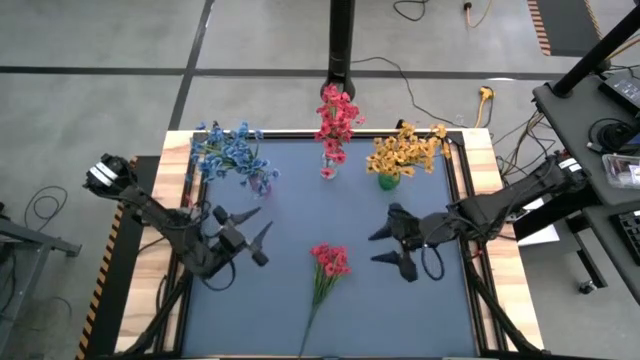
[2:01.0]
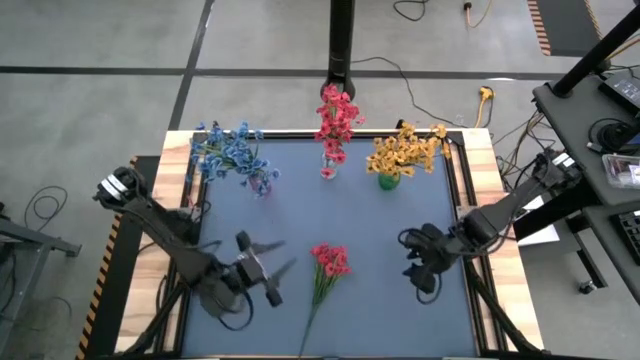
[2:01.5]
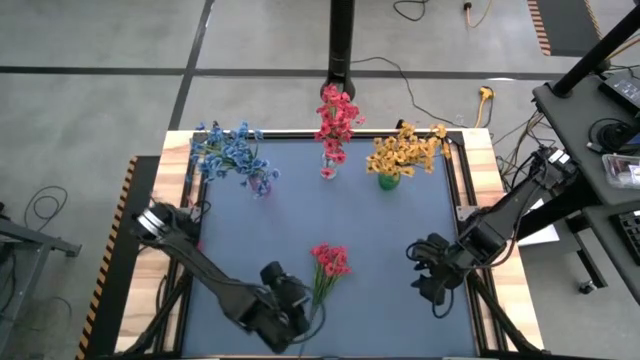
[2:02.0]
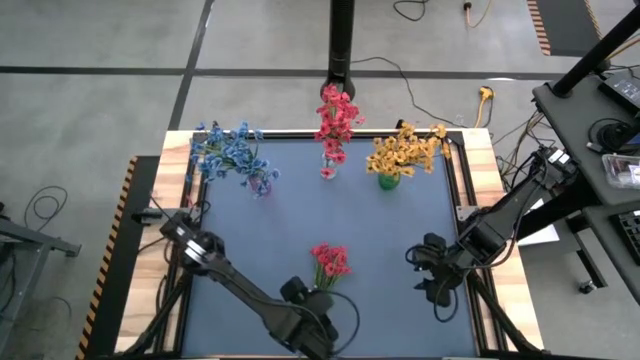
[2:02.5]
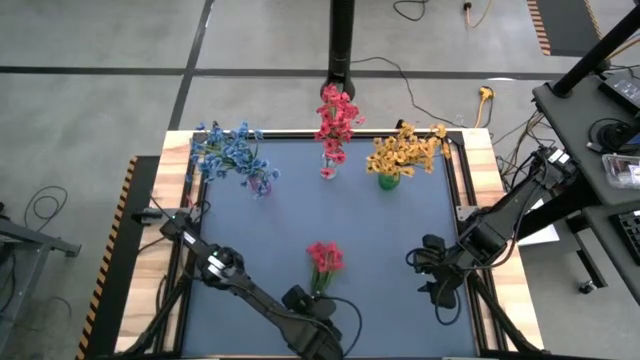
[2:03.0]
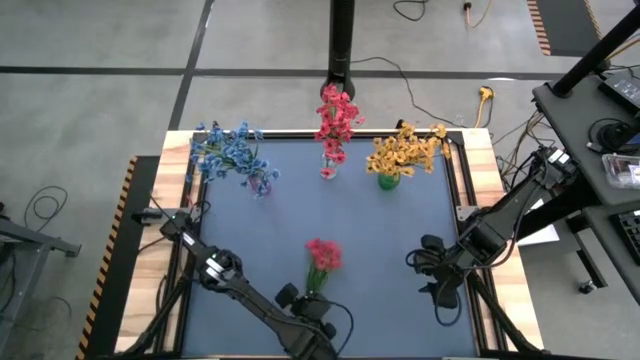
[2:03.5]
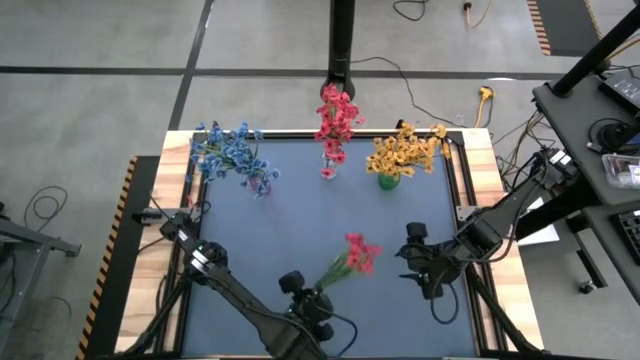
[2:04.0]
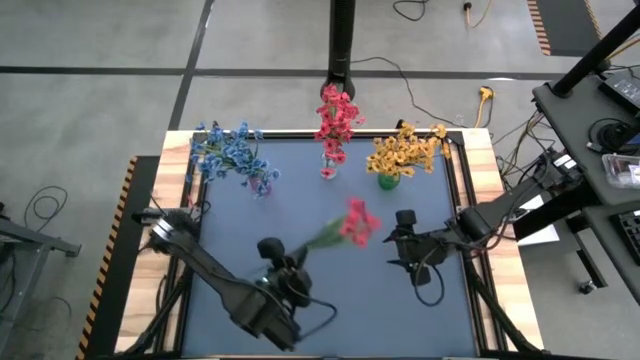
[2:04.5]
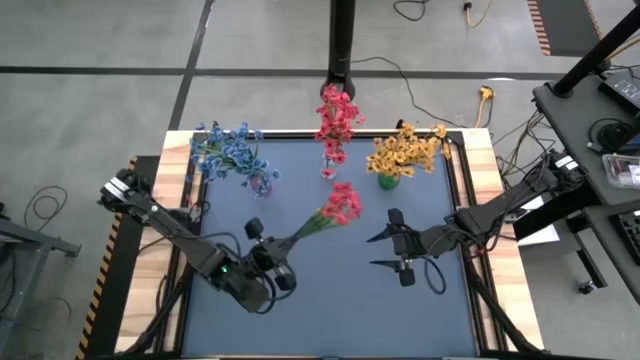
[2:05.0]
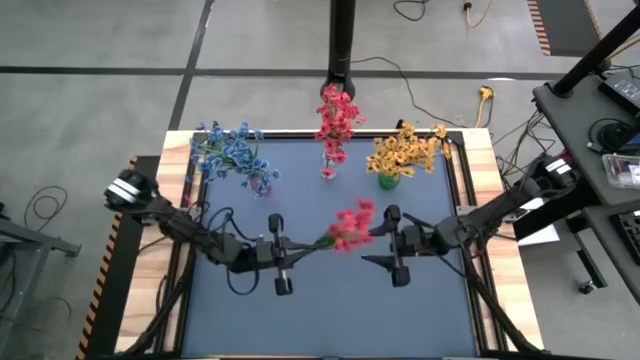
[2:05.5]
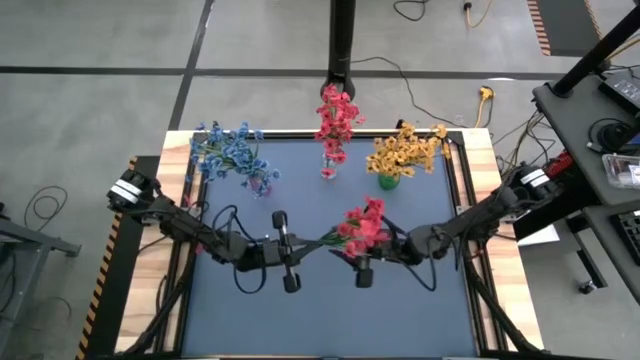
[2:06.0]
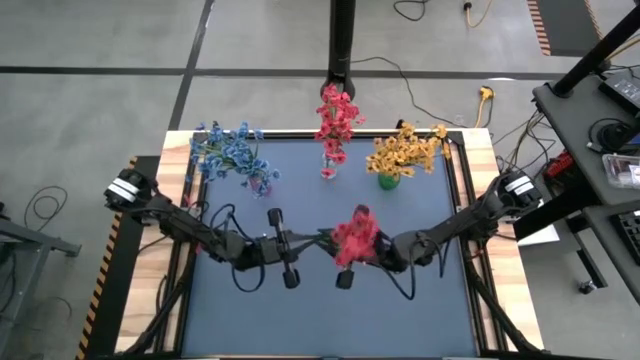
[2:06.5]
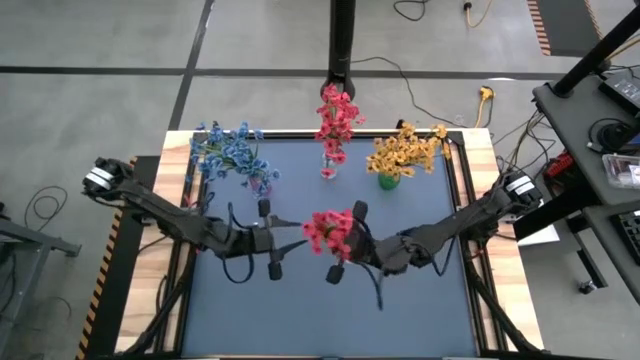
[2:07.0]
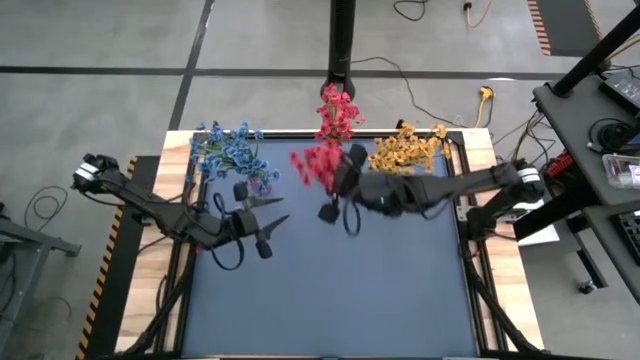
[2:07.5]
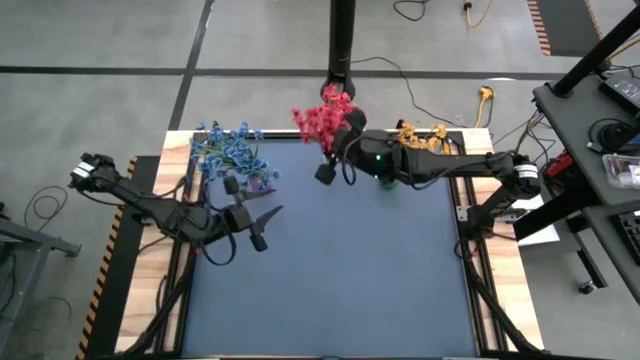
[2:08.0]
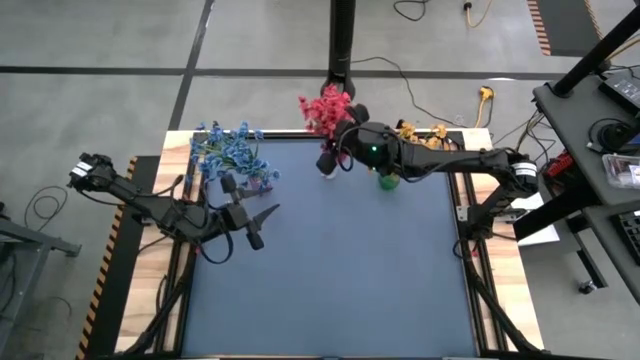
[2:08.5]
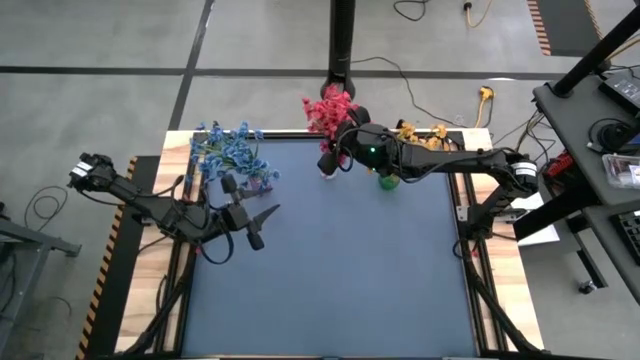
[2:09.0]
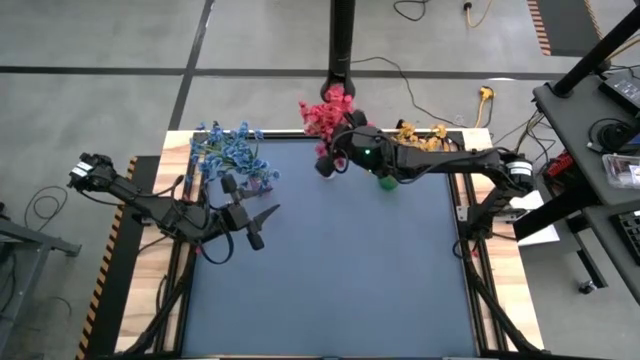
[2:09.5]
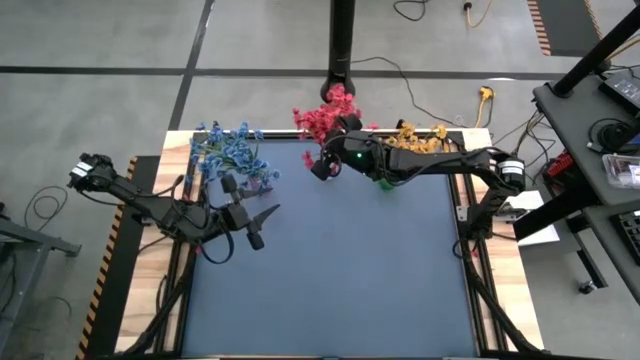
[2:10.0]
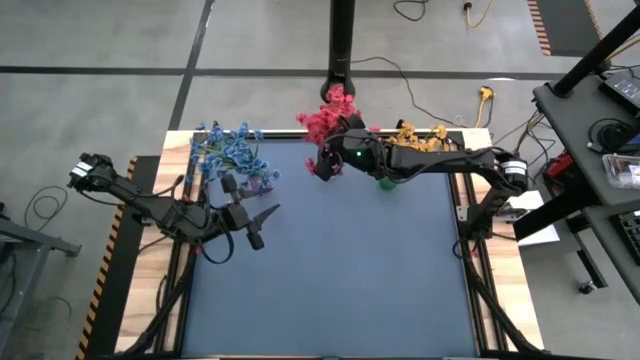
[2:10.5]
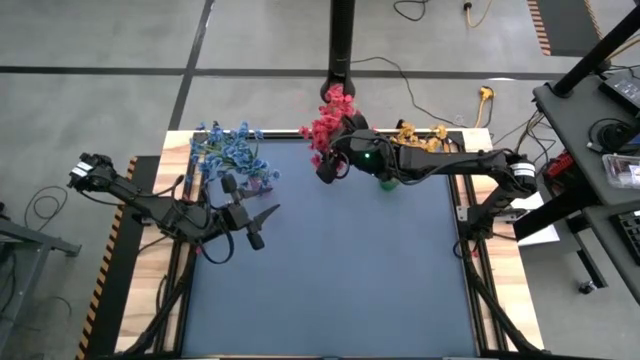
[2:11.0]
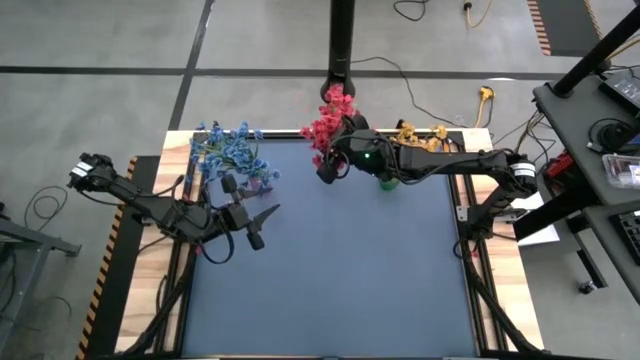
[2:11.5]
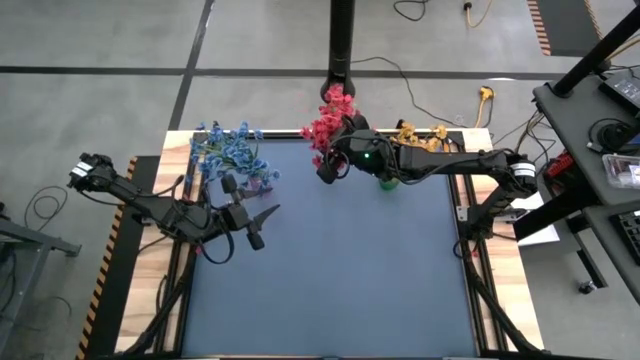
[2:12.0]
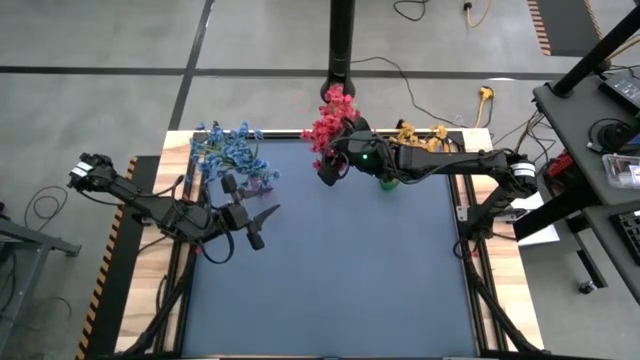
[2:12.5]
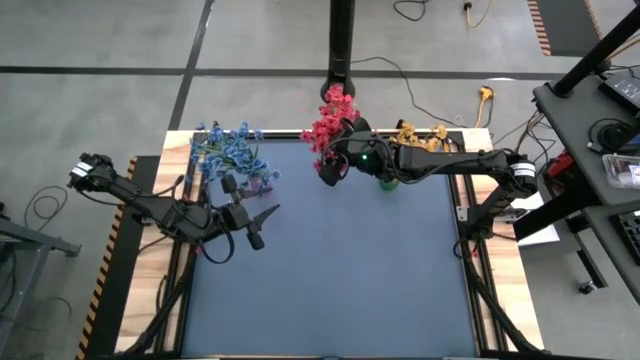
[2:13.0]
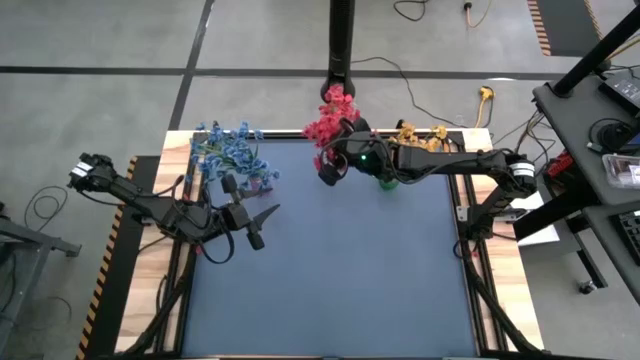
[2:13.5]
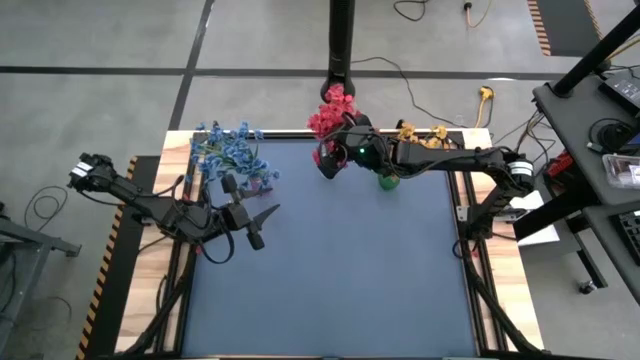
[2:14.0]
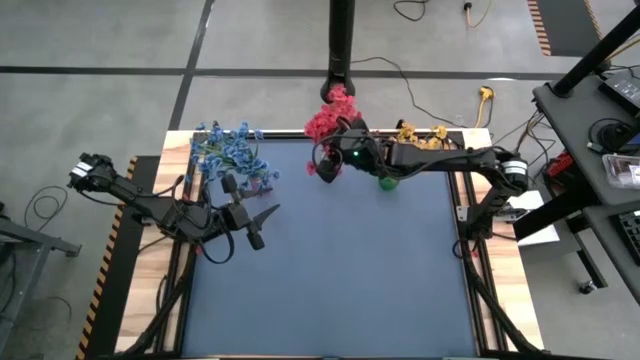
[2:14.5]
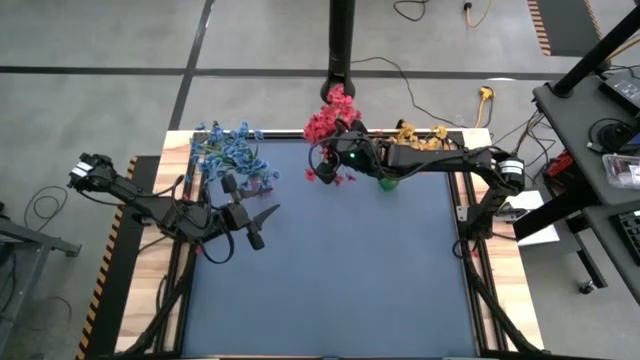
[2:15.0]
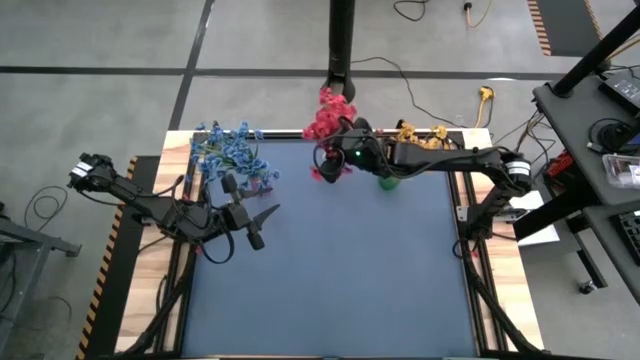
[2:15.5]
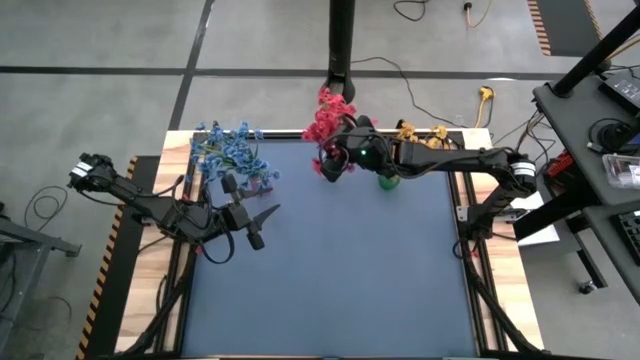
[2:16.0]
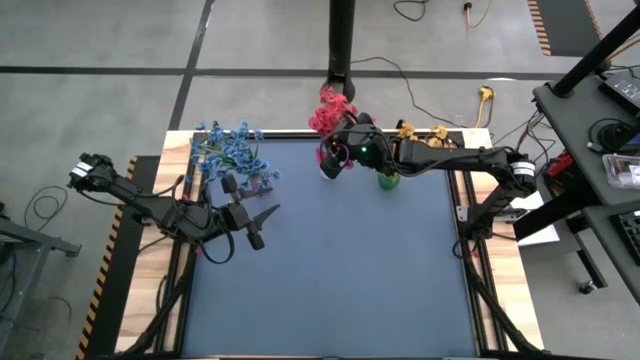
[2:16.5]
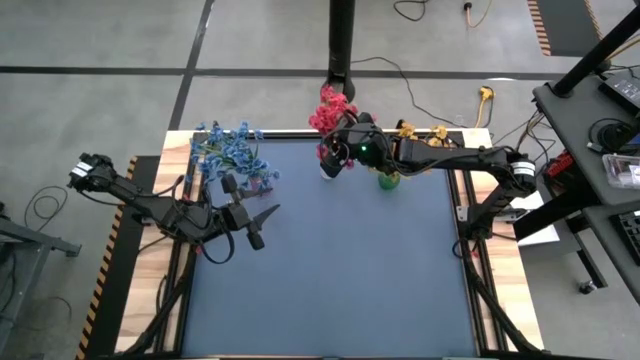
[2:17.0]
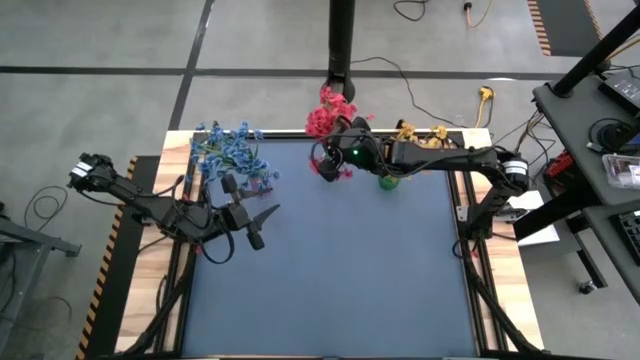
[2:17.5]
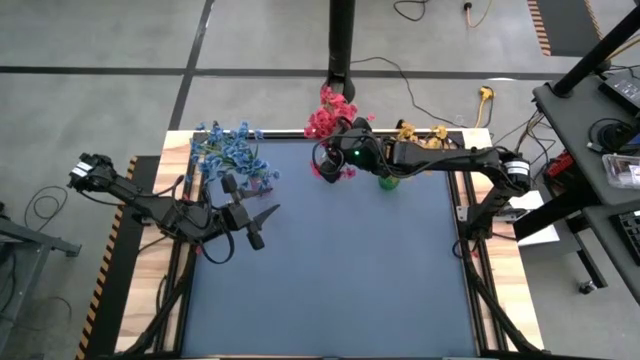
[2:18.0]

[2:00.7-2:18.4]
Task: Sort flowers into vase by color
Put the red flower into the transparent vase

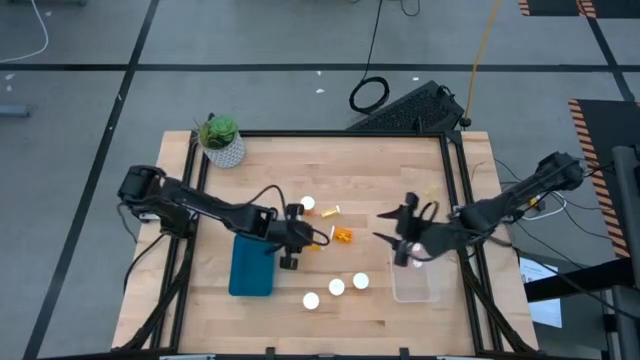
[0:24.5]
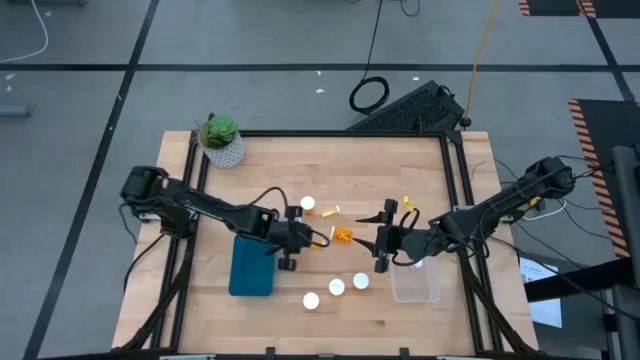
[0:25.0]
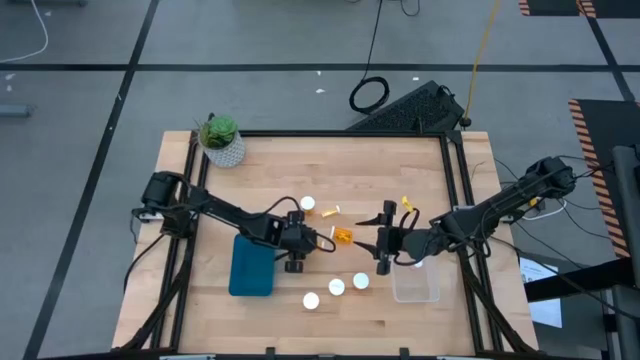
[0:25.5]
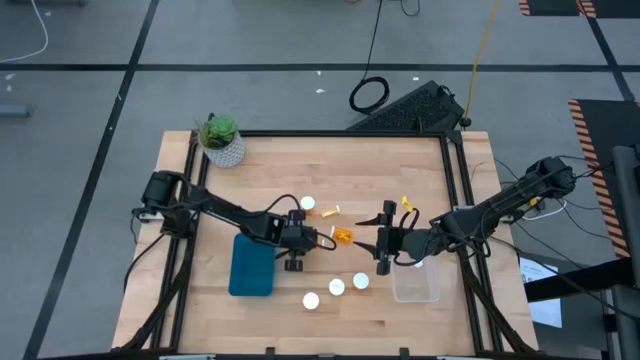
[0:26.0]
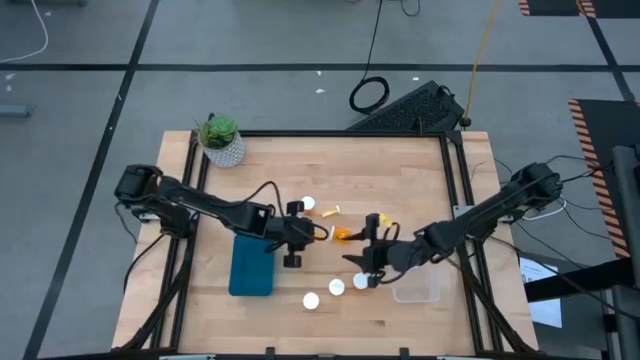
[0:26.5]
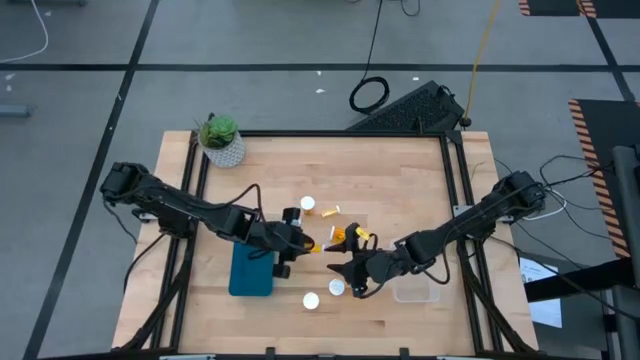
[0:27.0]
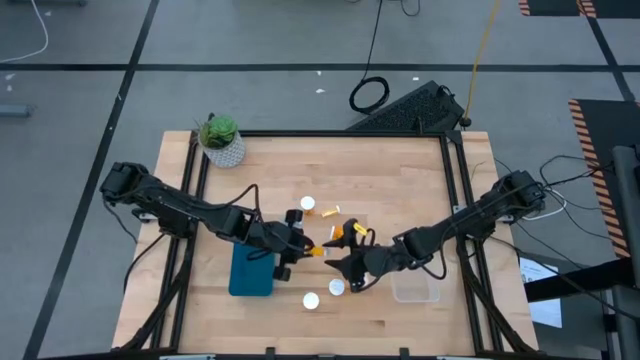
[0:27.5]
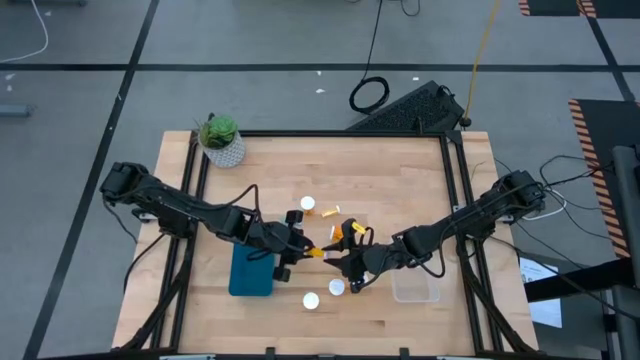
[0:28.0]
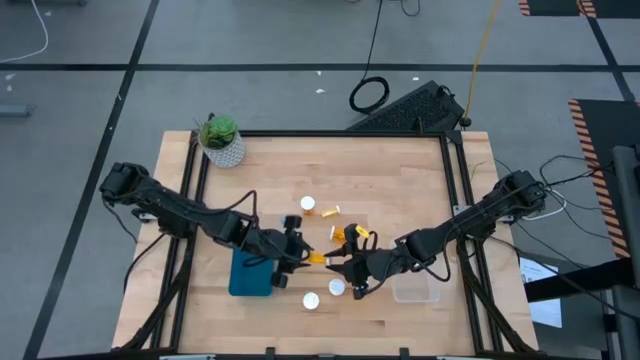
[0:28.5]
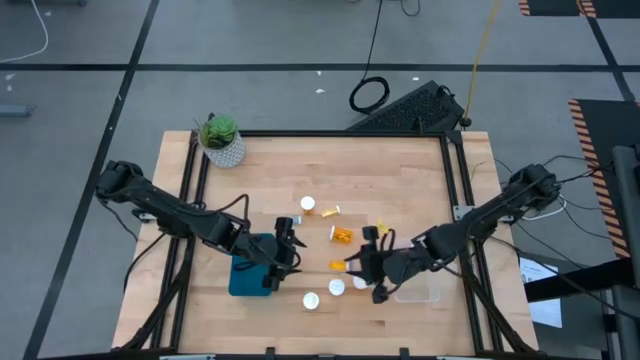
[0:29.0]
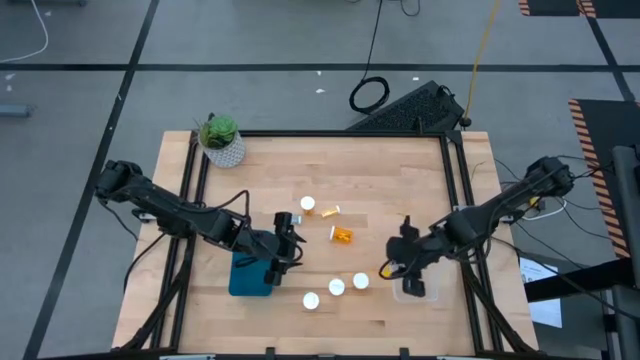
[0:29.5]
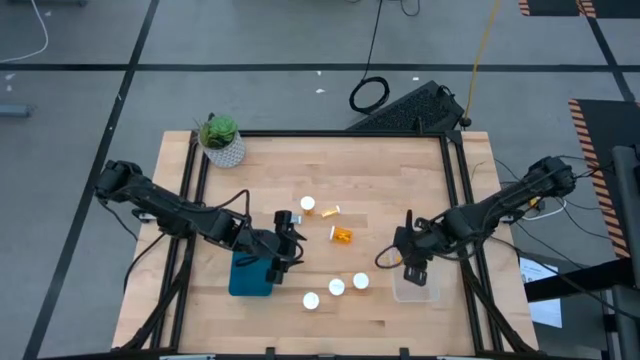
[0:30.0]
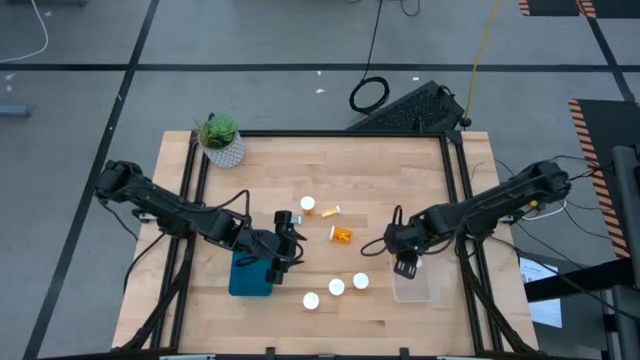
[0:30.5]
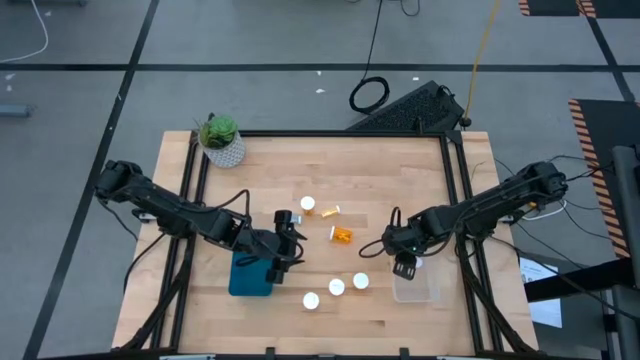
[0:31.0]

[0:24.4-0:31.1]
Task: Pick and place medicine bottles into bin by pill shape (circle, oval)
Put the orange bottled tablet into the transparent bin
